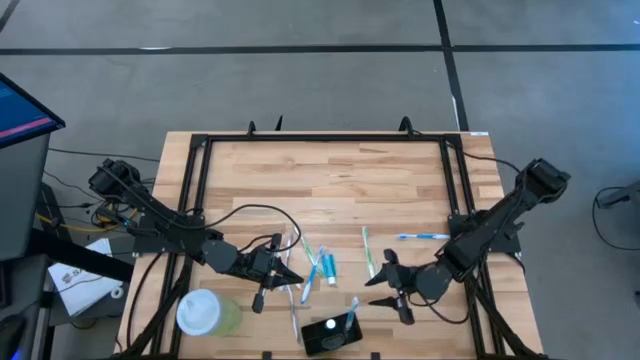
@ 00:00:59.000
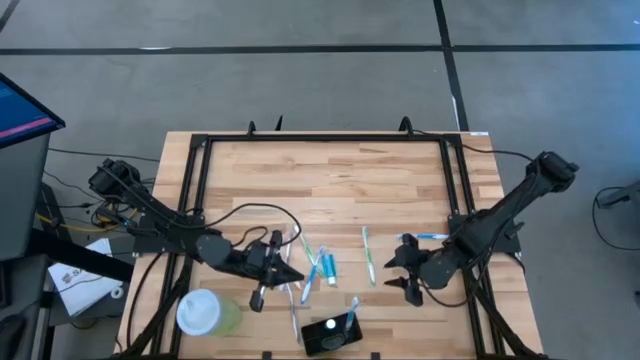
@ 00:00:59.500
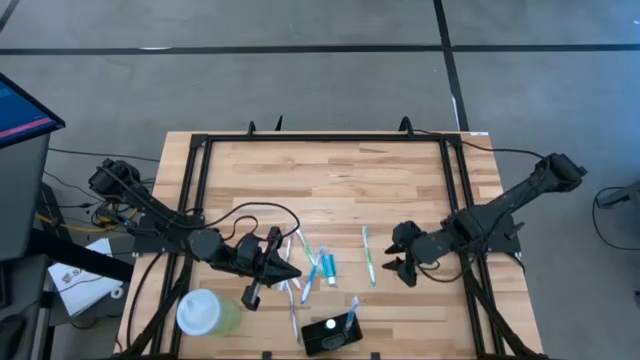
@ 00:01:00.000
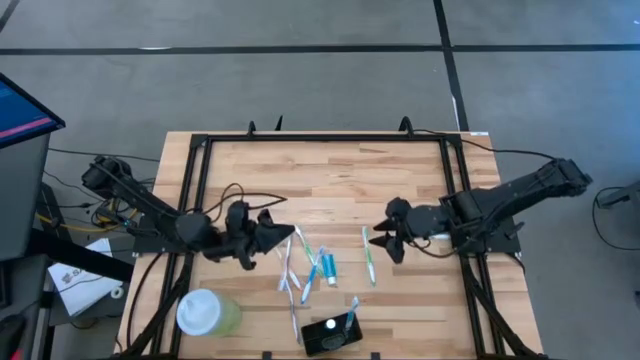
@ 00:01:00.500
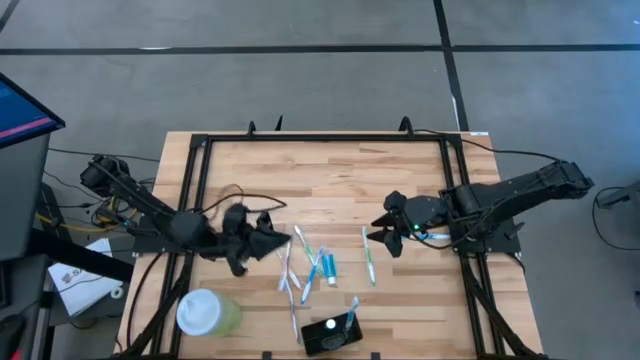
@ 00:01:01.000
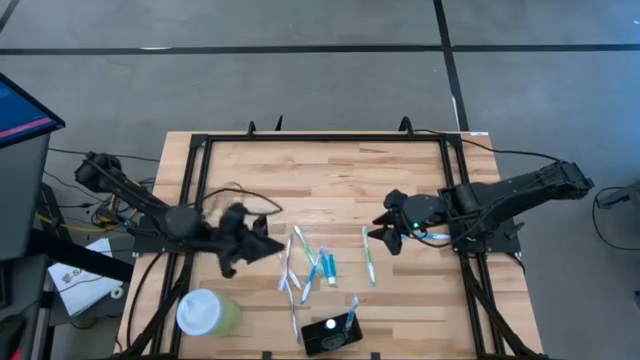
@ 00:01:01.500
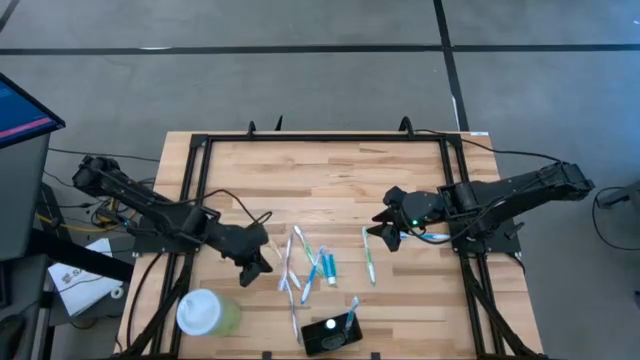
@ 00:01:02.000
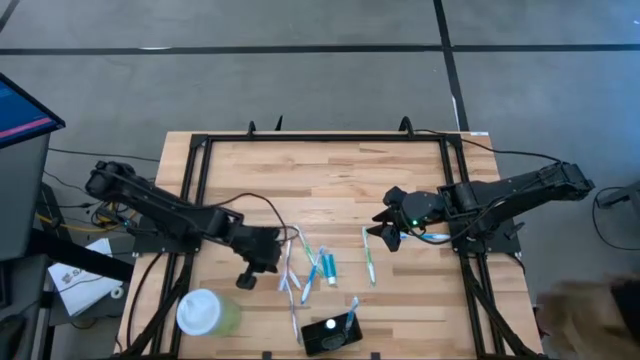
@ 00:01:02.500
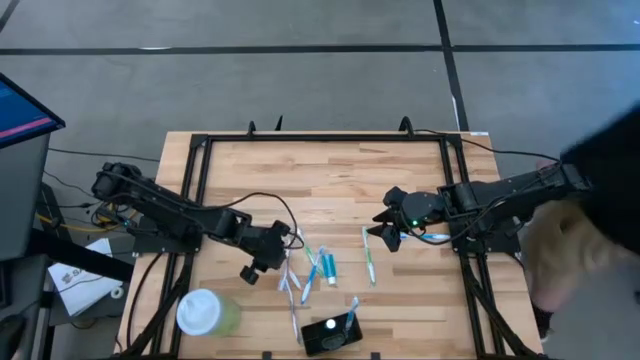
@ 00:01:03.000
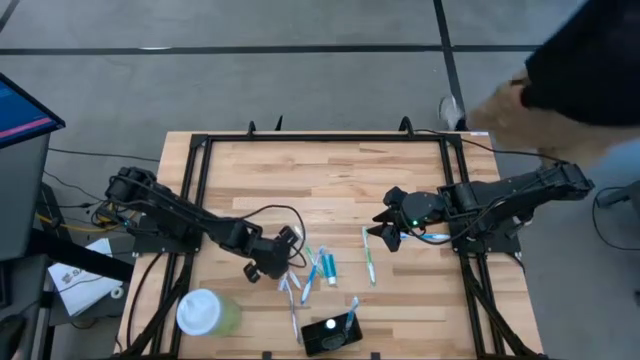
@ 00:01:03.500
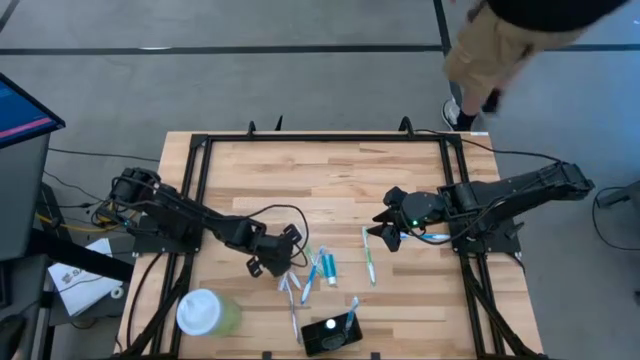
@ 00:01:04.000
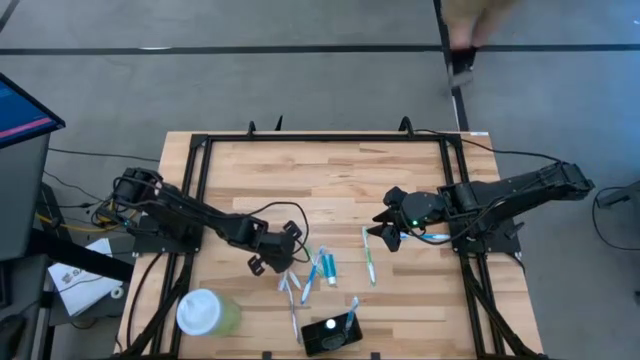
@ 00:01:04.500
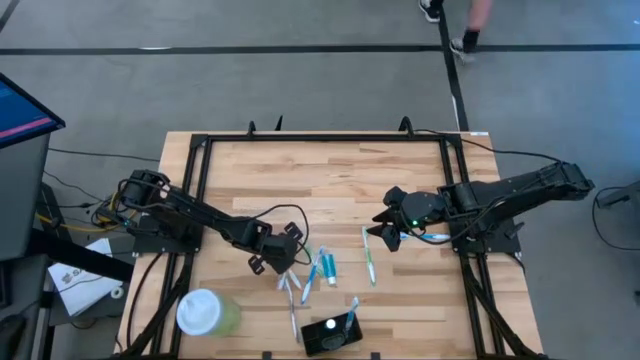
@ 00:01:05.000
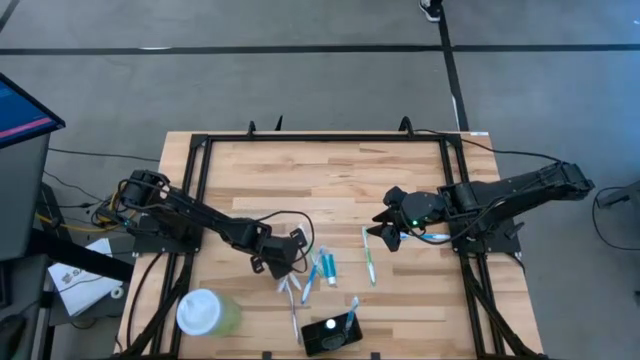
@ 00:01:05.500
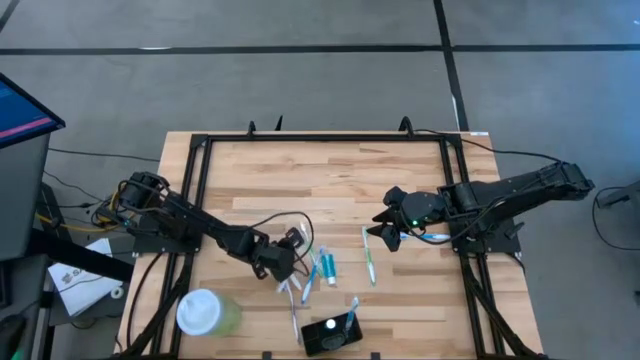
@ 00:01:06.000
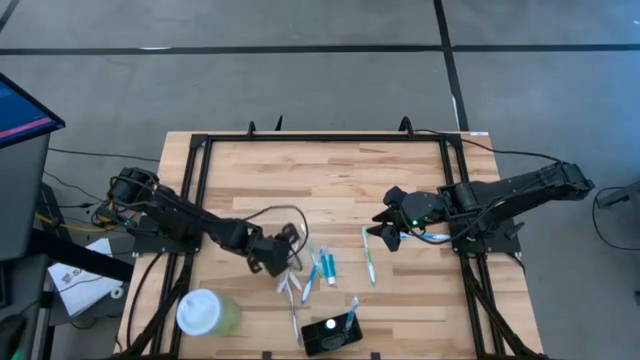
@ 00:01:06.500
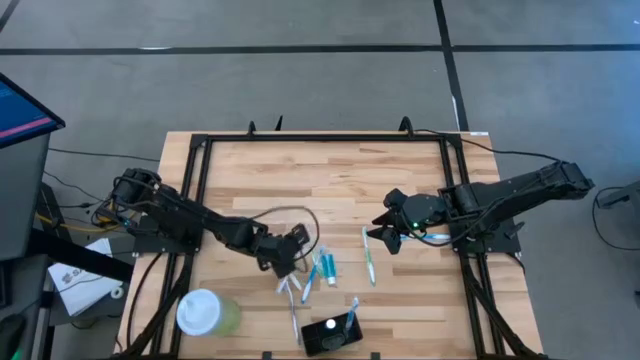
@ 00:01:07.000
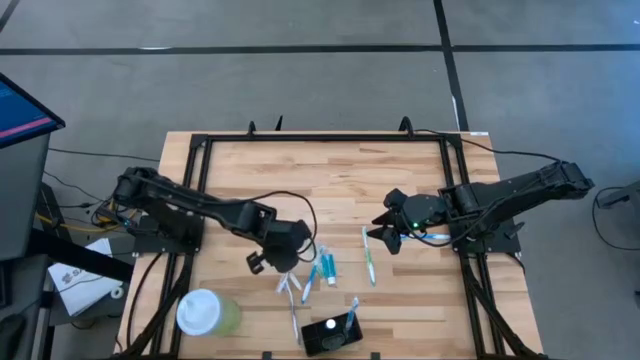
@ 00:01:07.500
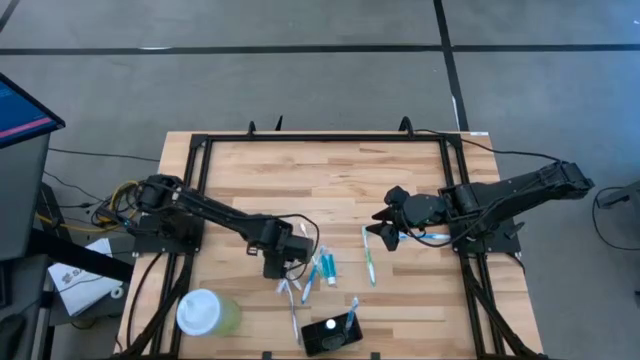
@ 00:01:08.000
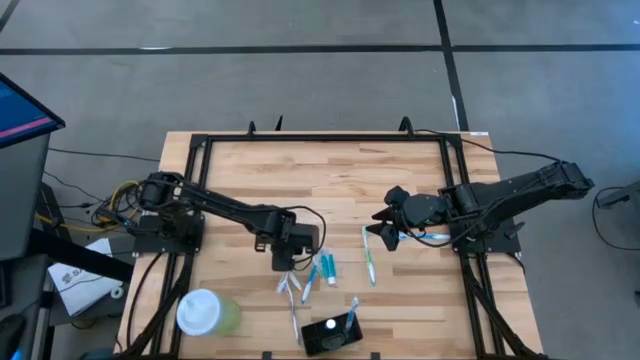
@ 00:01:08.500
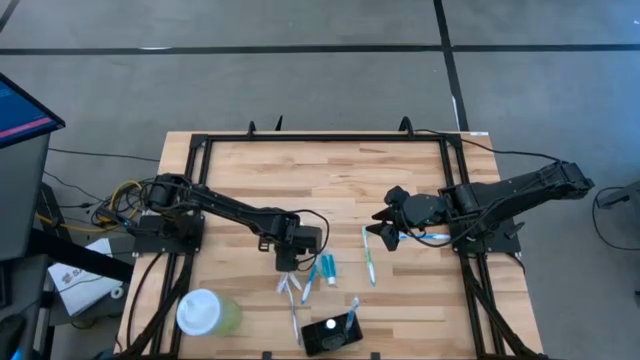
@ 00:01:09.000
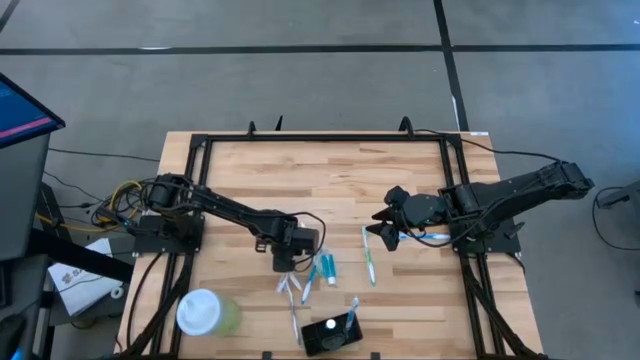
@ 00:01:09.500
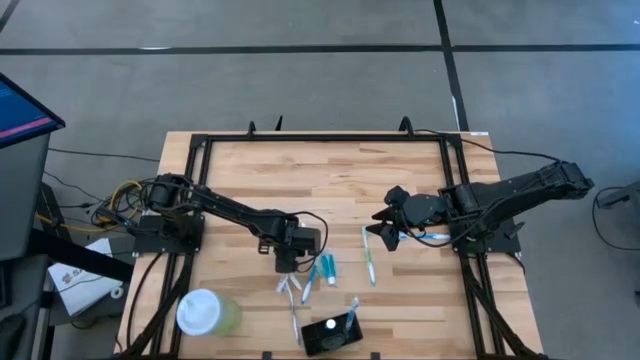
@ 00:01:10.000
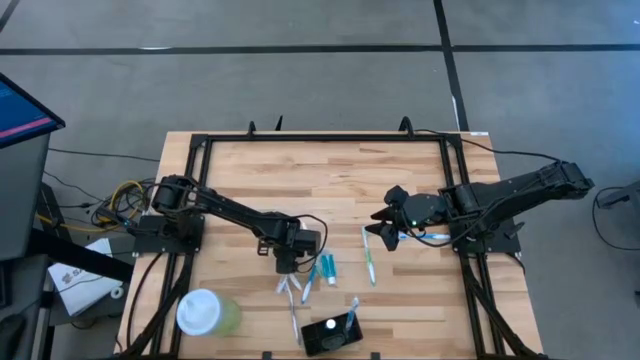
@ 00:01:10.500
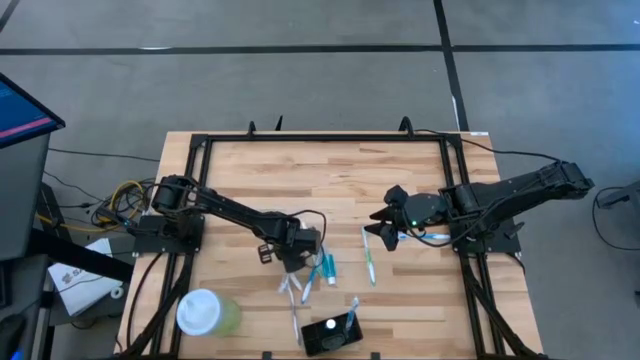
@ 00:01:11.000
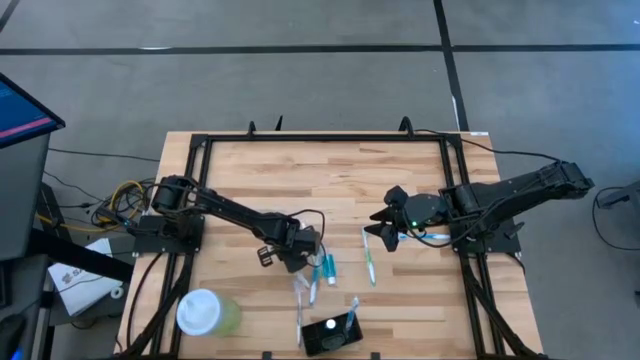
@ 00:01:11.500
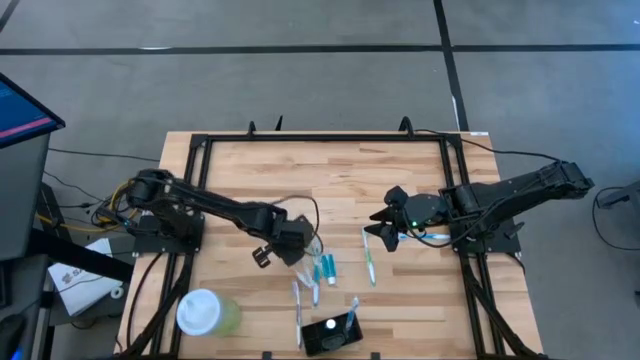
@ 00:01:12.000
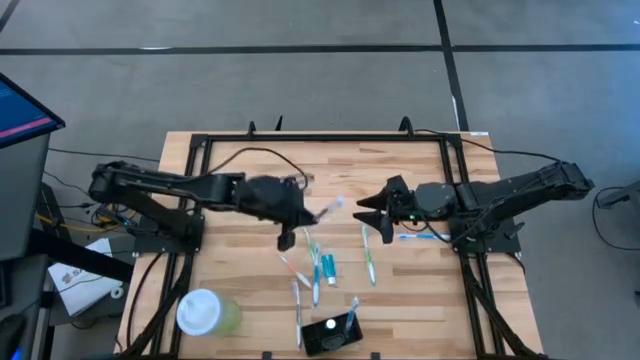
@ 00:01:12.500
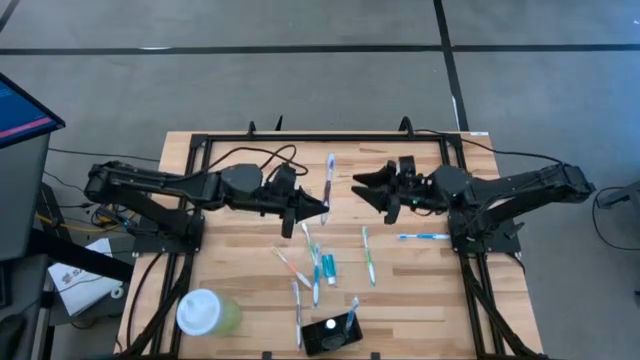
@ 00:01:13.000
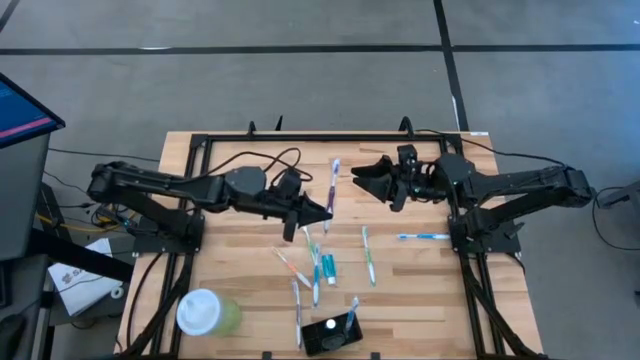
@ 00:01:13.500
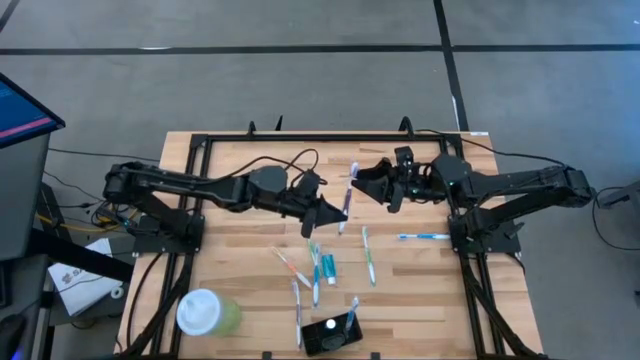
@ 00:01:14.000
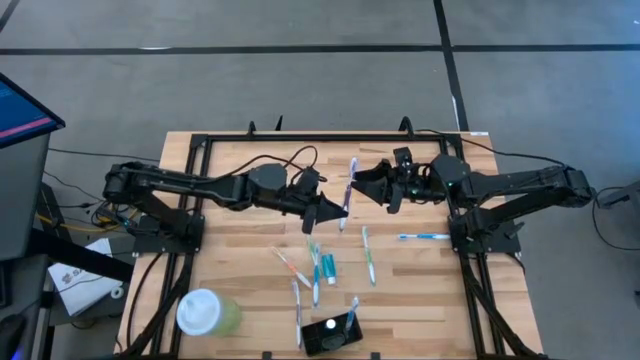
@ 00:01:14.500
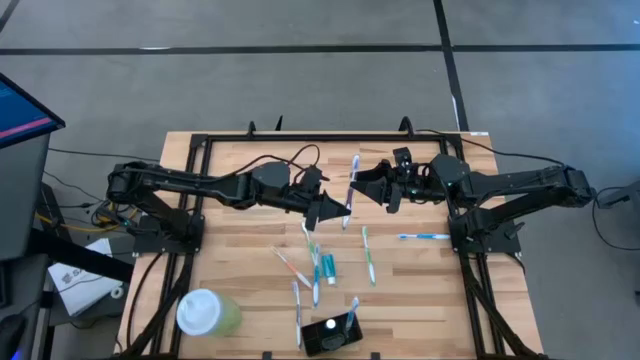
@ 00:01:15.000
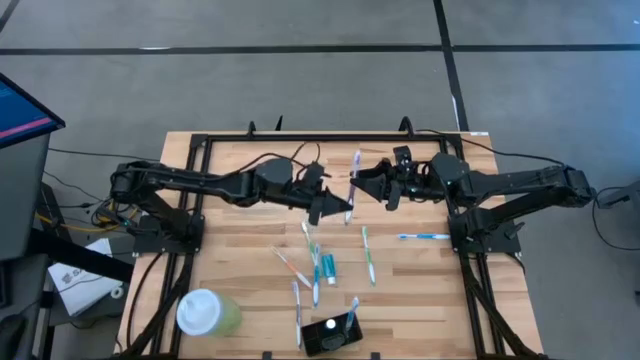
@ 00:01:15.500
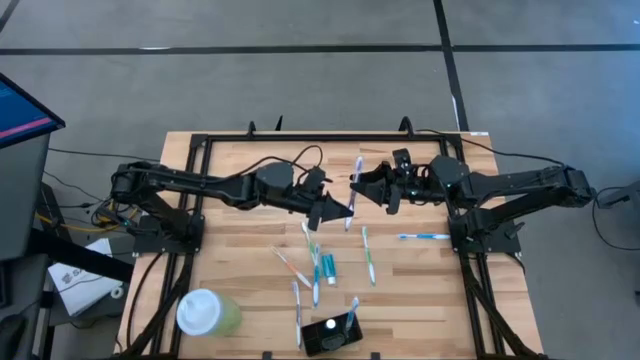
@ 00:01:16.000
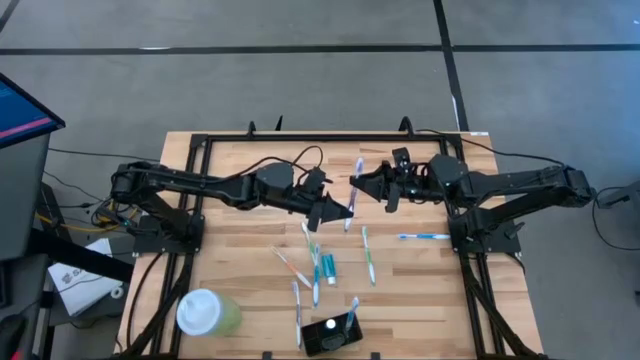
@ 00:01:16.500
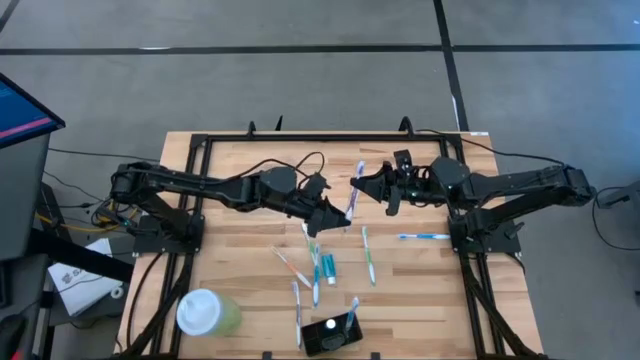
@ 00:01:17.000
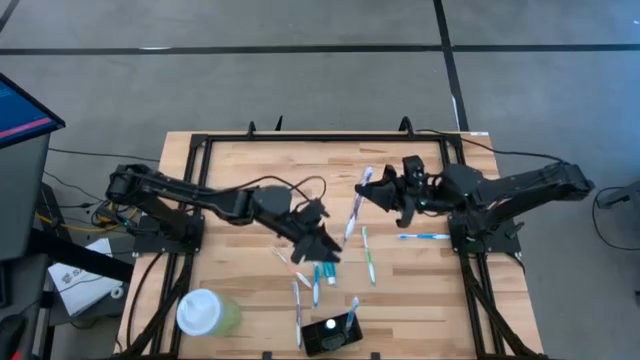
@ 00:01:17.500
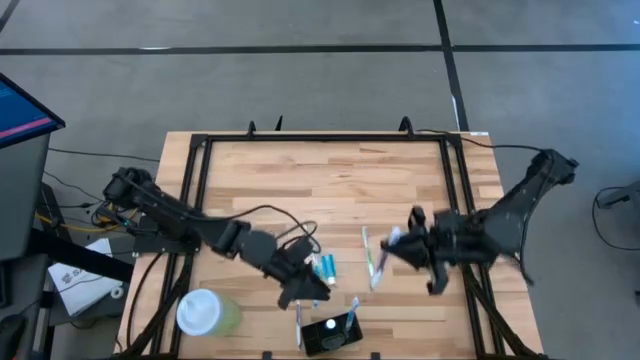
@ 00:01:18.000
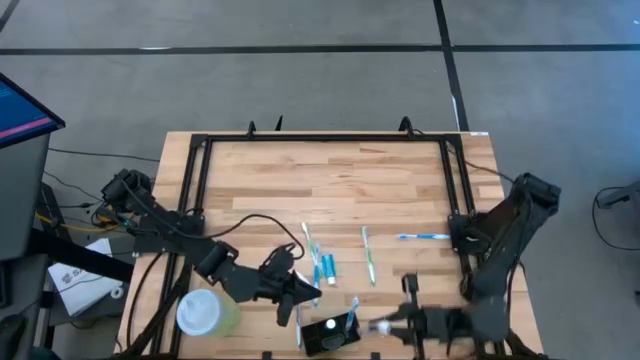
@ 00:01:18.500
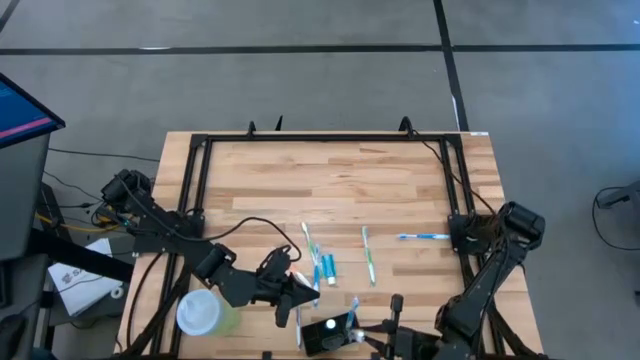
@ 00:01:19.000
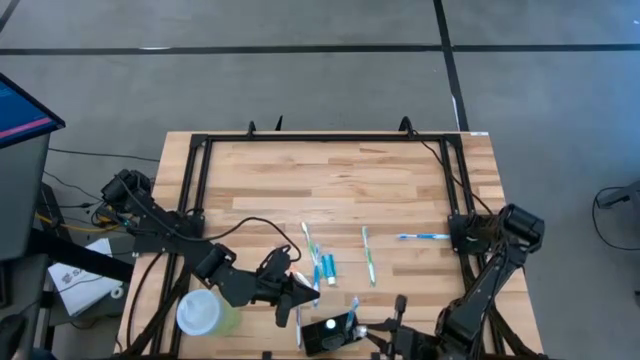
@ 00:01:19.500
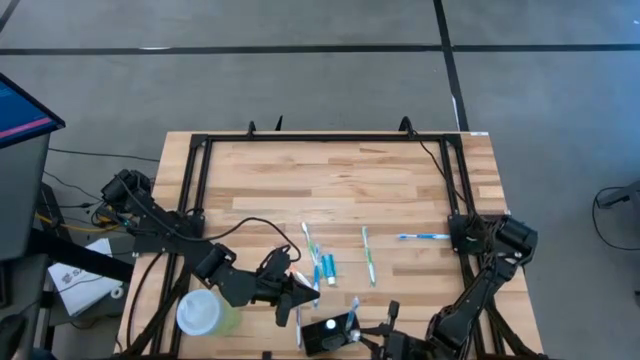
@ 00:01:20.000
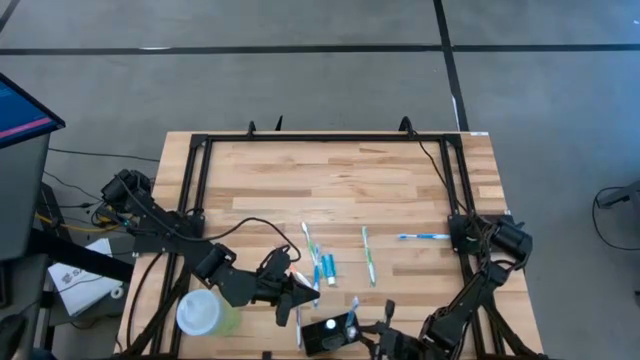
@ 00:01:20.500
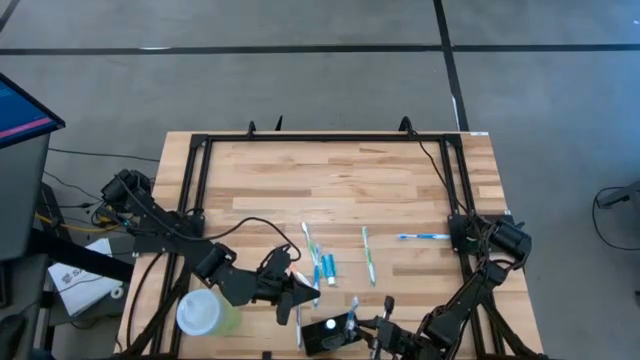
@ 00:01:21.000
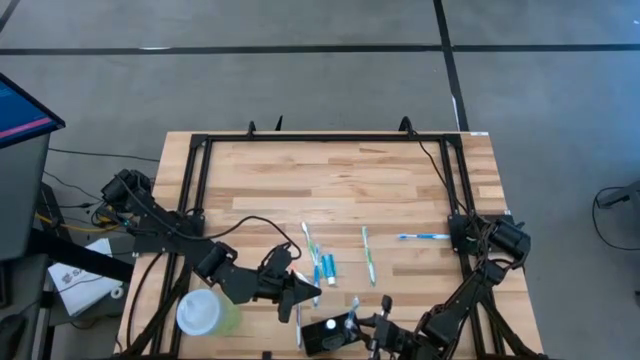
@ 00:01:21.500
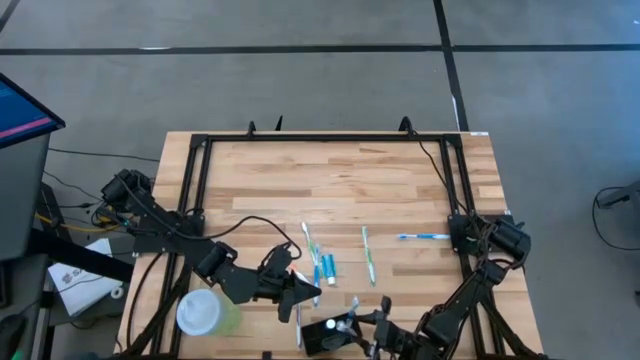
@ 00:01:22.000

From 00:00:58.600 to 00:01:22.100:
Task: Pick & Place toothbrushing station
Put the top violet toothbrush into the black wire organizer
